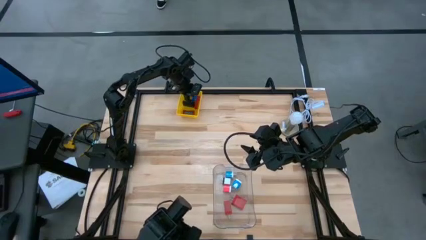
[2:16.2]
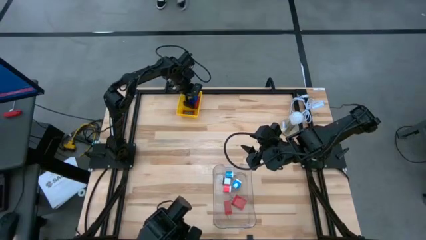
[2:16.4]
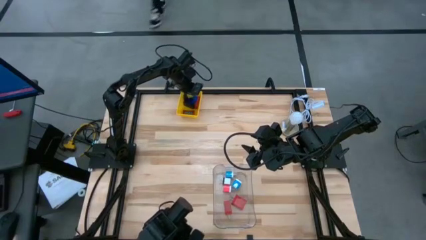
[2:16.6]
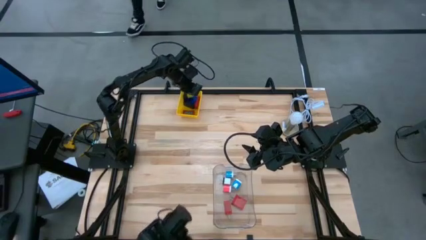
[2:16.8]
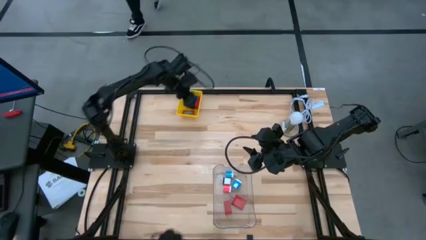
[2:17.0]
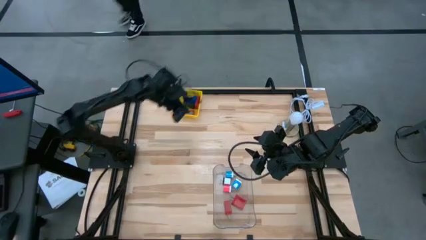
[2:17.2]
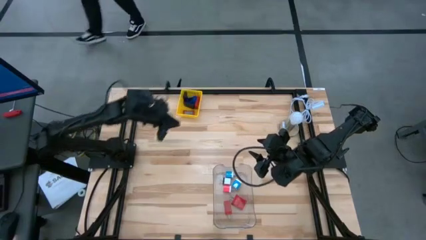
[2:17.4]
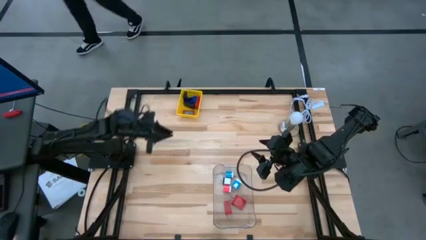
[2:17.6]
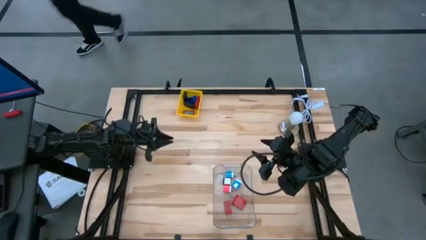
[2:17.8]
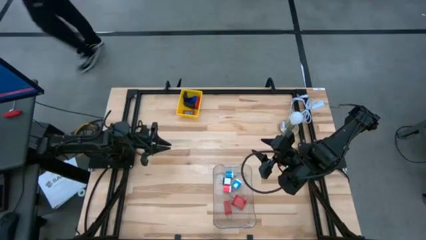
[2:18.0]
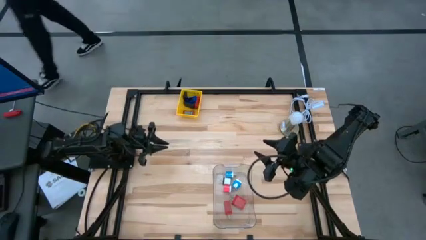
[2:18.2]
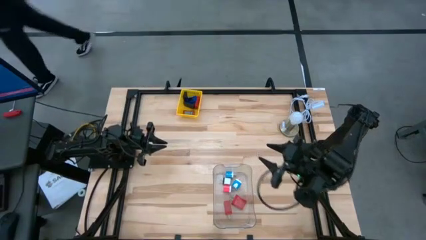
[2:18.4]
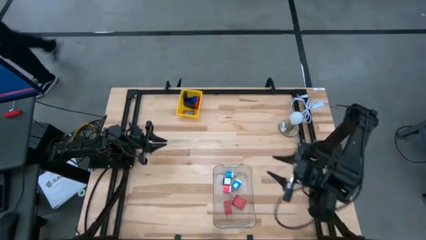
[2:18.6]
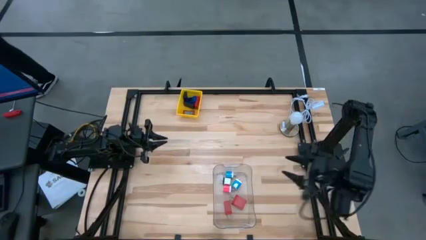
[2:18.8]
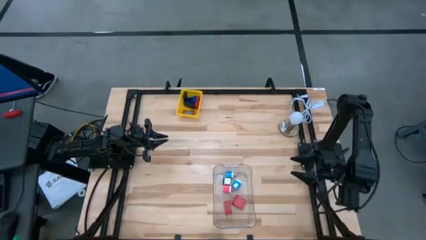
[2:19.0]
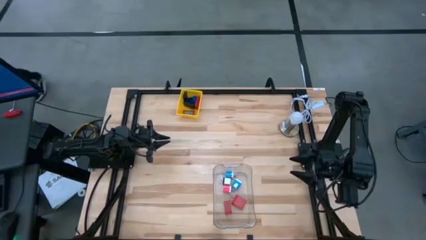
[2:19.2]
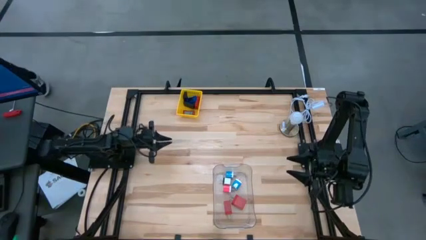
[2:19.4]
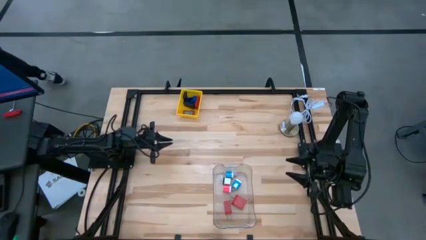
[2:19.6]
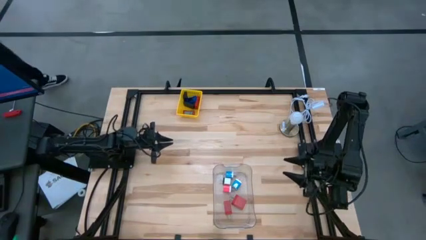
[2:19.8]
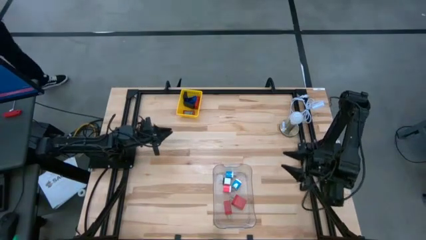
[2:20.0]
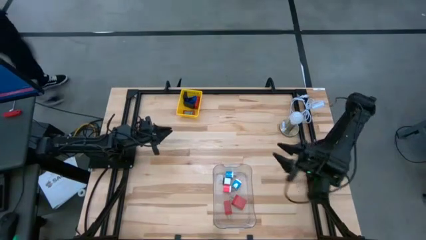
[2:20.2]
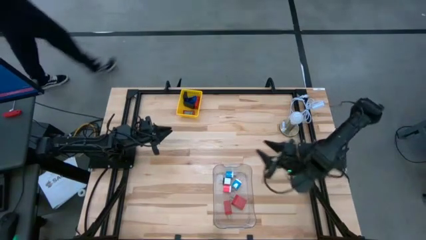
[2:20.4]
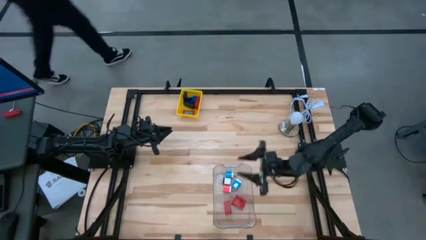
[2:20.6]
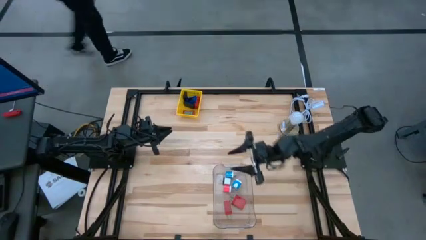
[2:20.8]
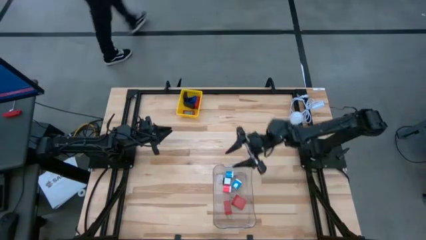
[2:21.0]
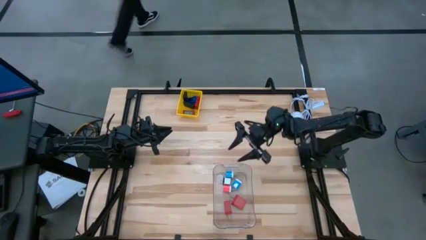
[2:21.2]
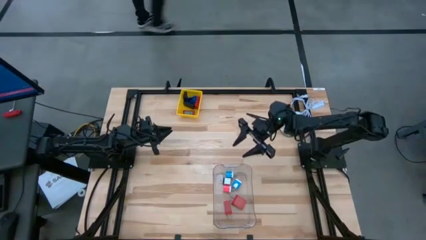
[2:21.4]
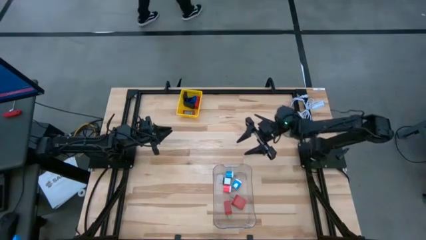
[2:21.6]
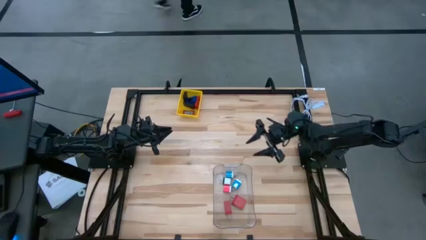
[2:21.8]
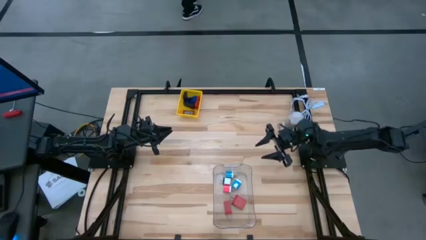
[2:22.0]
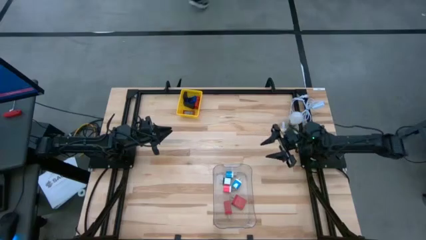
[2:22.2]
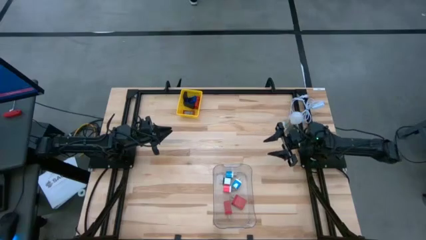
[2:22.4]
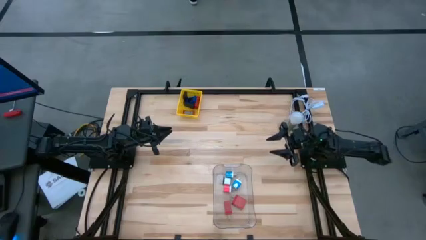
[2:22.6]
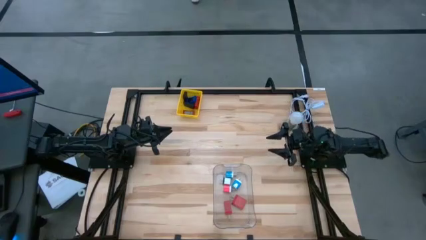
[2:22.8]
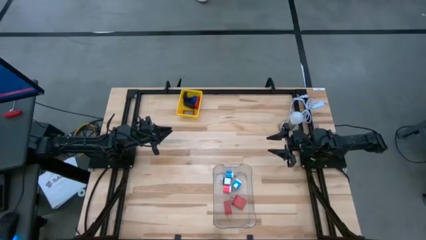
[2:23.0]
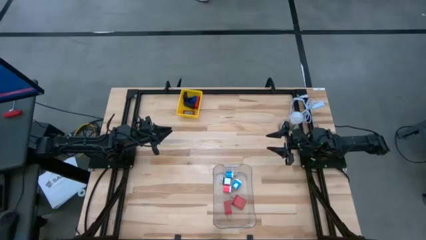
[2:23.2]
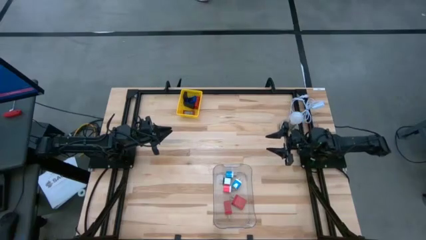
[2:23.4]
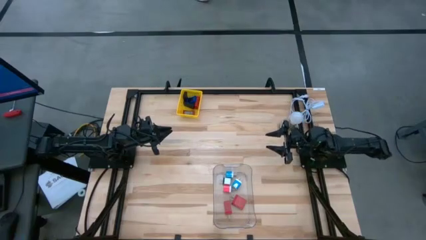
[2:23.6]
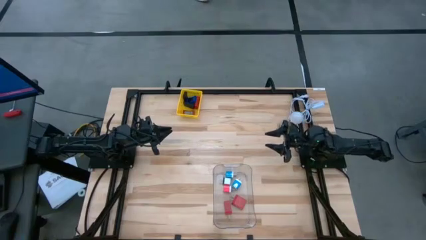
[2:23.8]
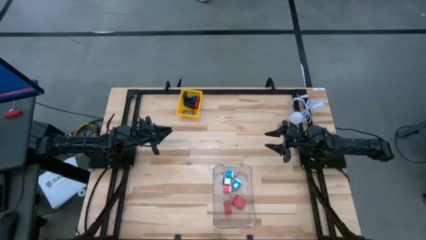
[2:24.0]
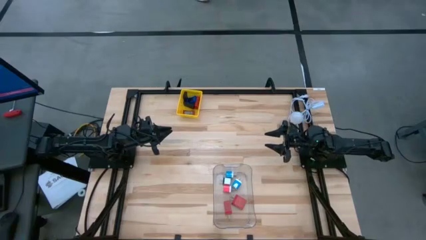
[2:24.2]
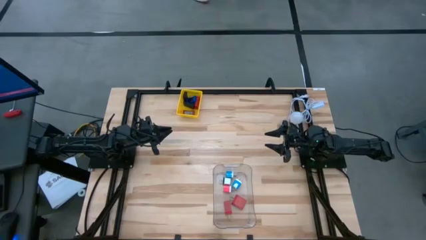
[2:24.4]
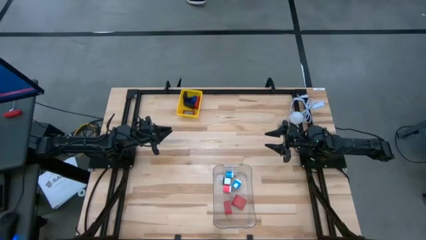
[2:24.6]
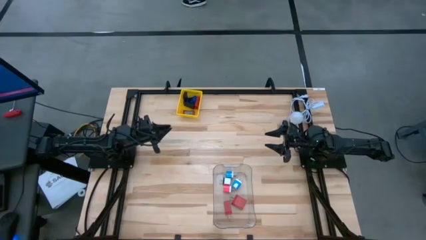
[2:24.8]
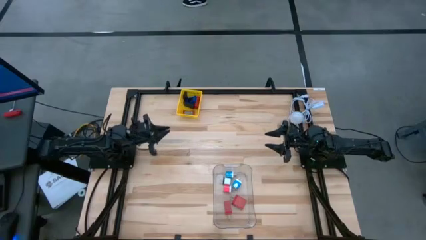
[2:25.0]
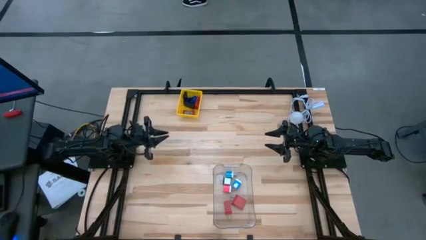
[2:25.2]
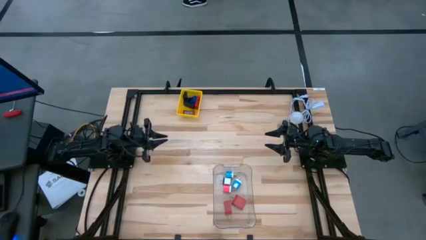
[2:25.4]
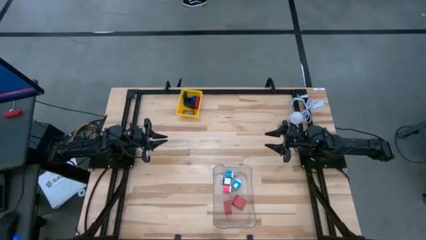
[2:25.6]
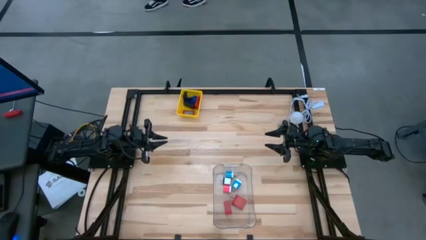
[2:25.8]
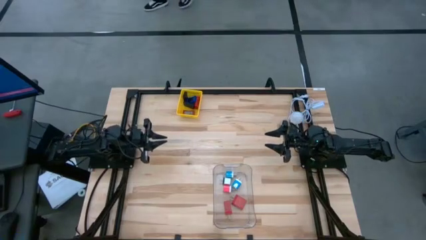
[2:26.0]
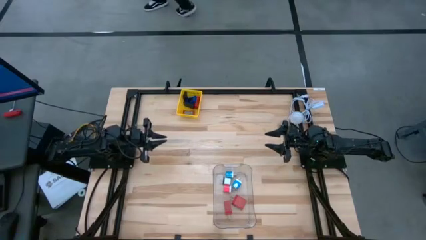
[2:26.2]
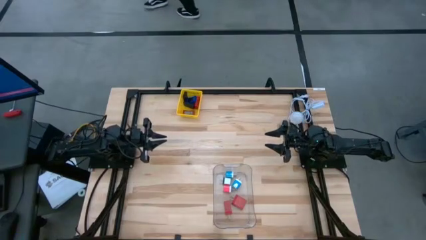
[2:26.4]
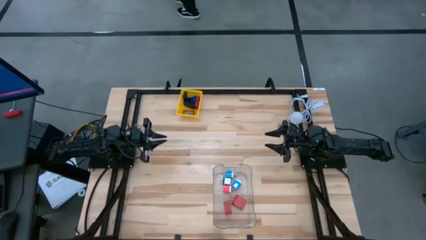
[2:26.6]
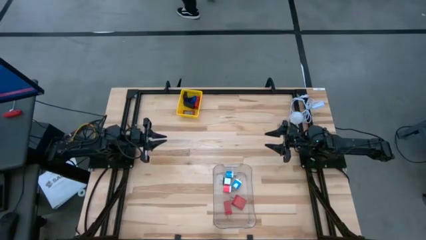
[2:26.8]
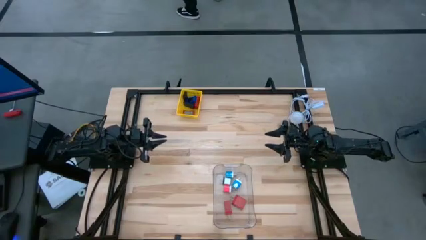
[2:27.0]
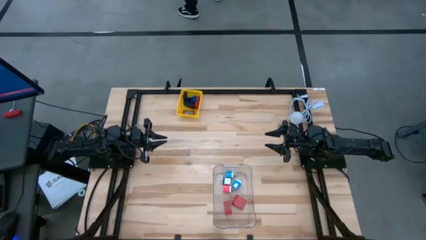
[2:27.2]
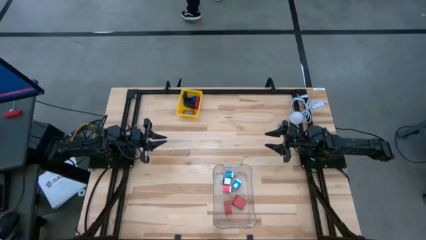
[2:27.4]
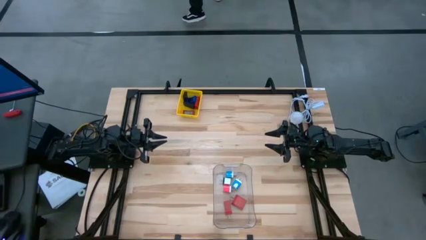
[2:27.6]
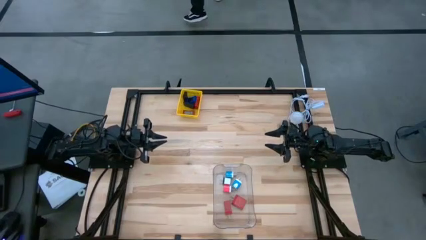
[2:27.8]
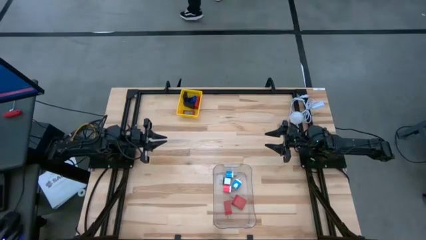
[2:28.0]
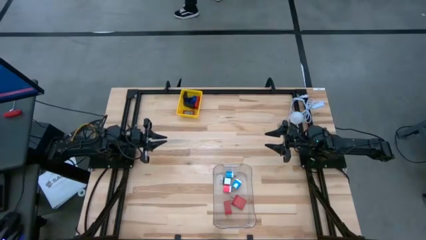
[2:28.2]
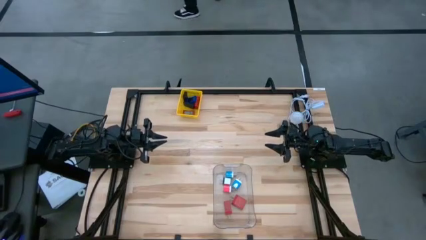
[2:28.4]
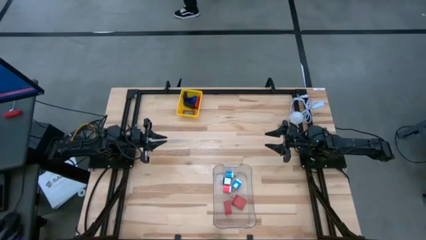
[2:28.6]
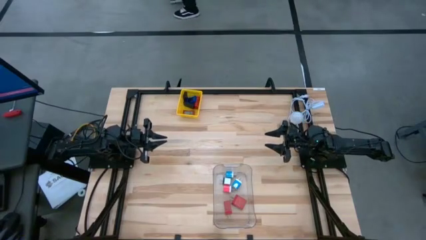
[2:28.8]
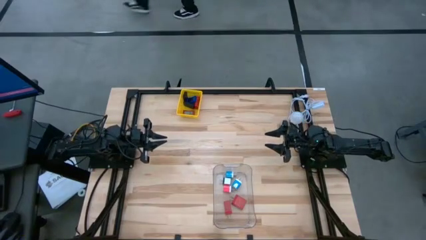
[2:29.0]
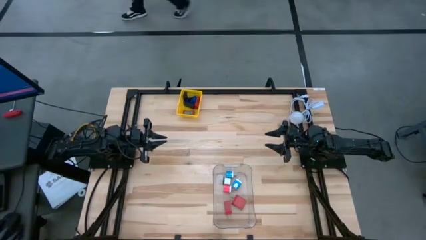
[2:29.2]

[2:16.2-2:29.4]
Task: Pick & Place Office items
Return to Home Position
